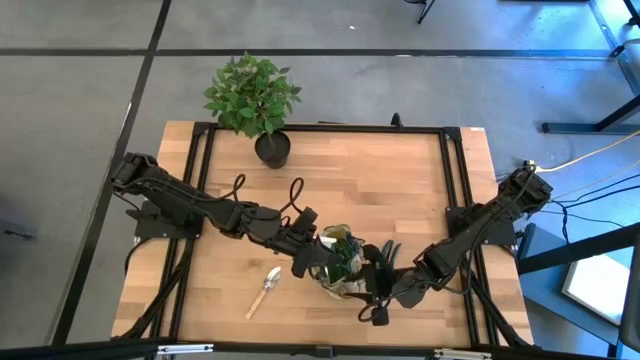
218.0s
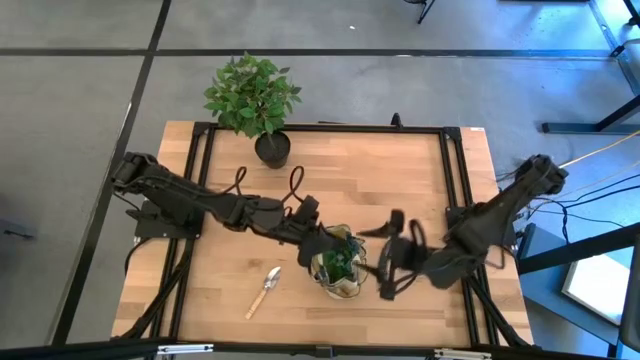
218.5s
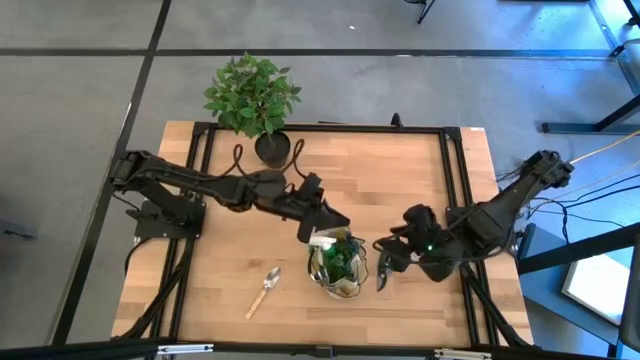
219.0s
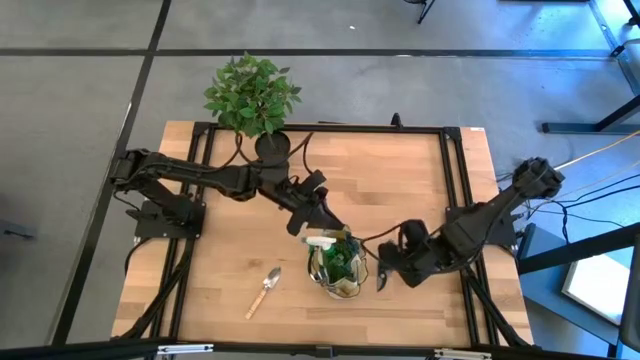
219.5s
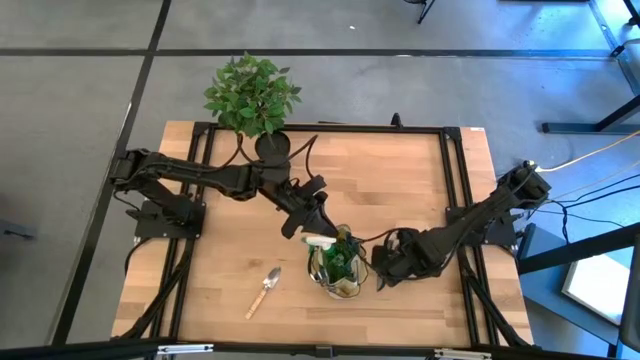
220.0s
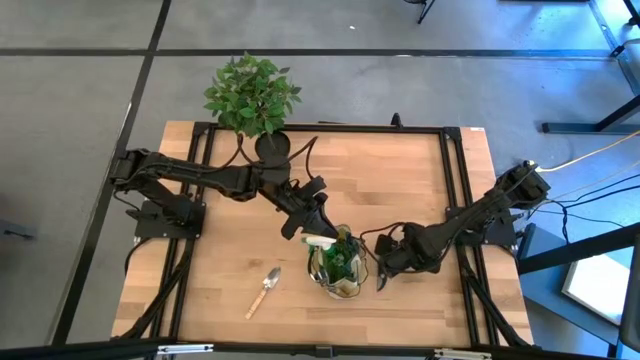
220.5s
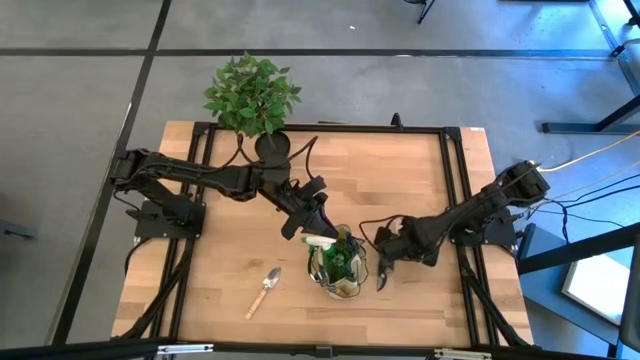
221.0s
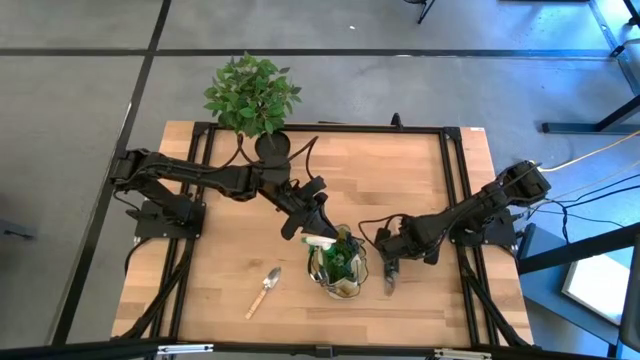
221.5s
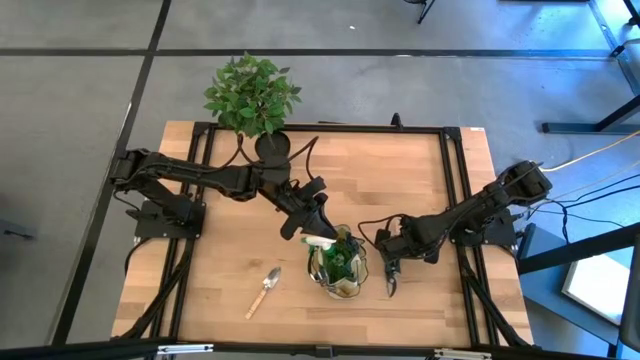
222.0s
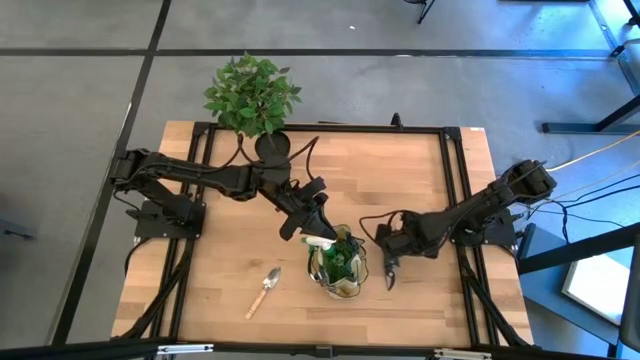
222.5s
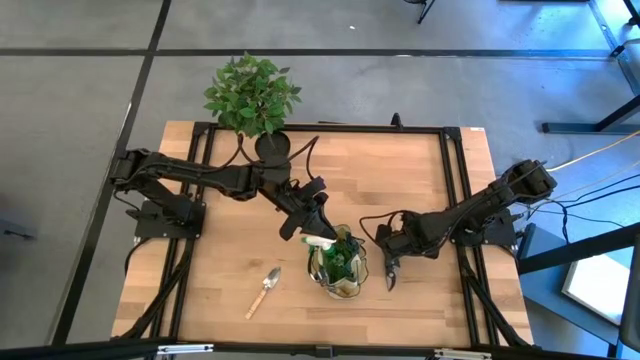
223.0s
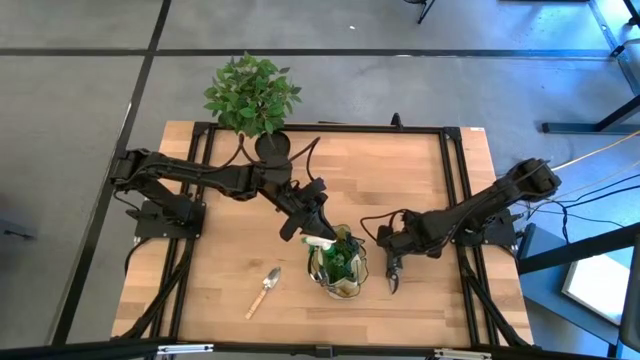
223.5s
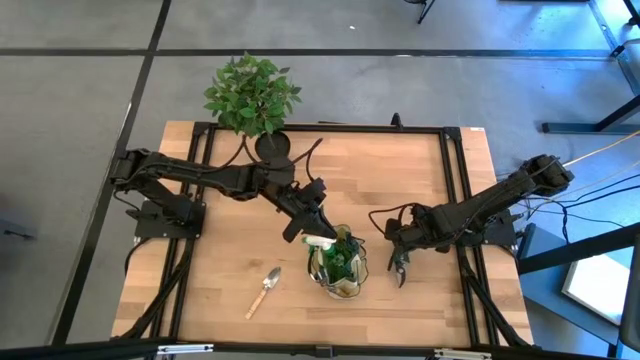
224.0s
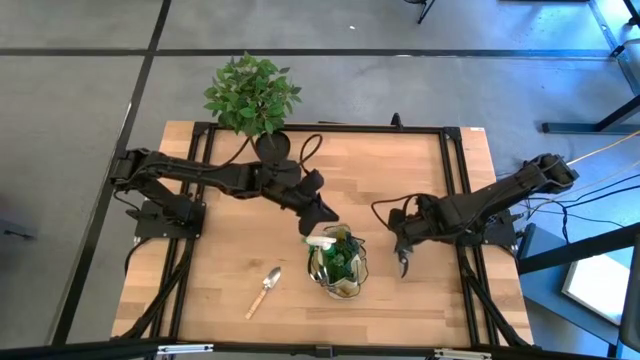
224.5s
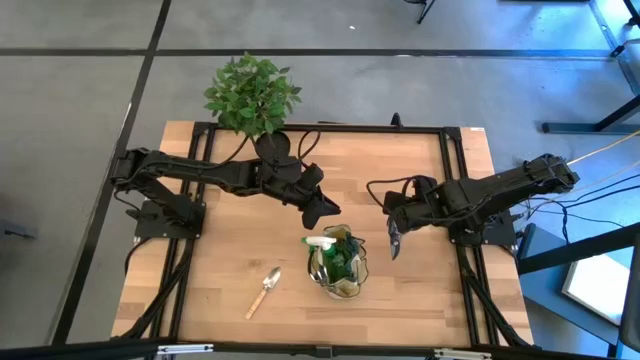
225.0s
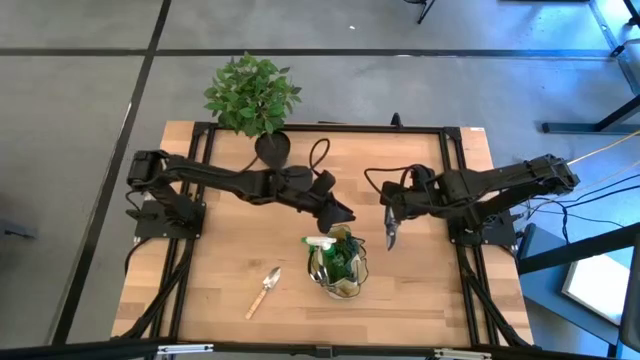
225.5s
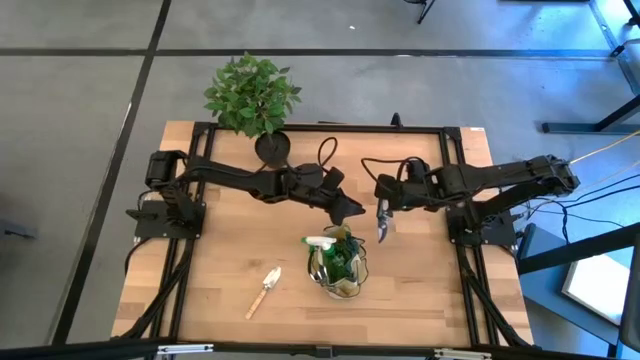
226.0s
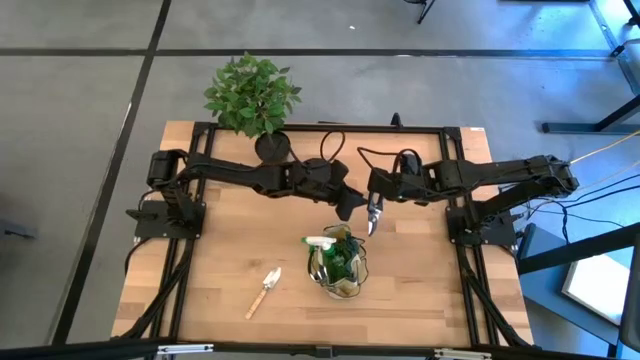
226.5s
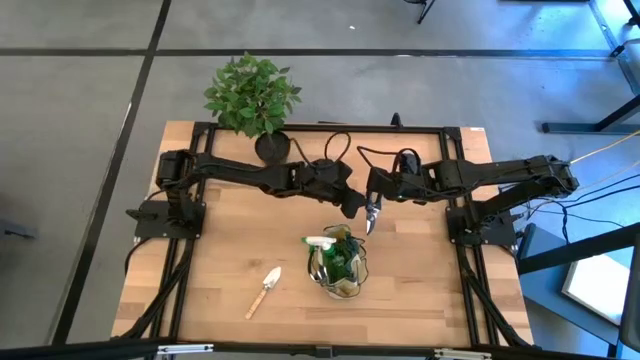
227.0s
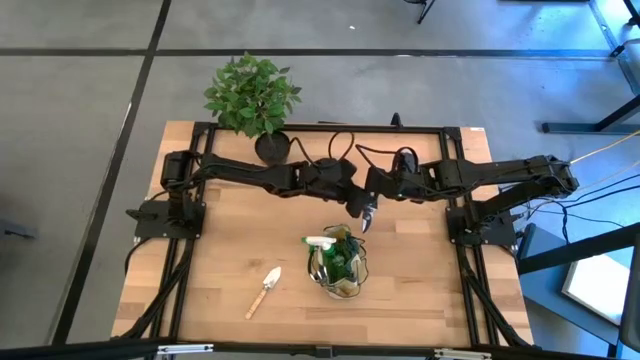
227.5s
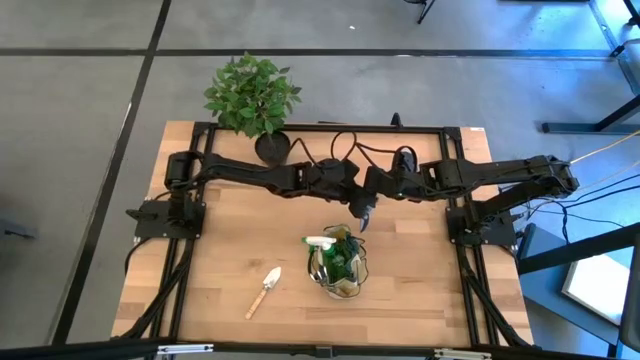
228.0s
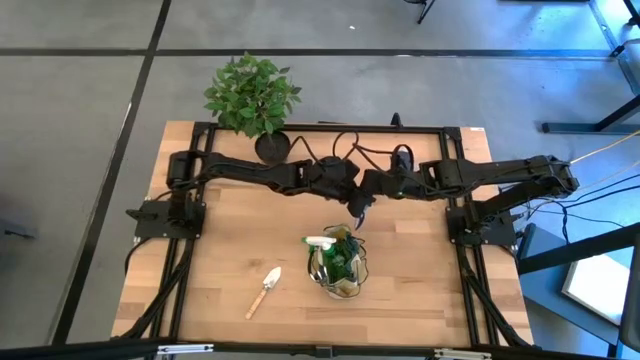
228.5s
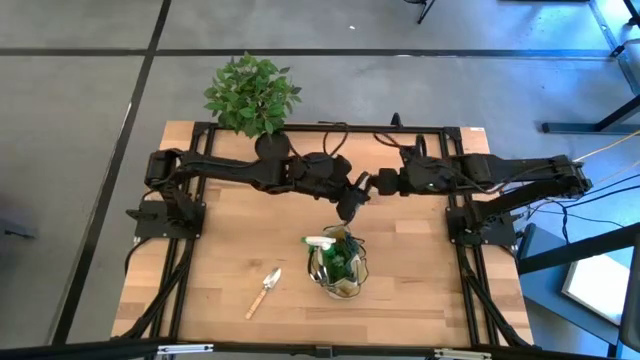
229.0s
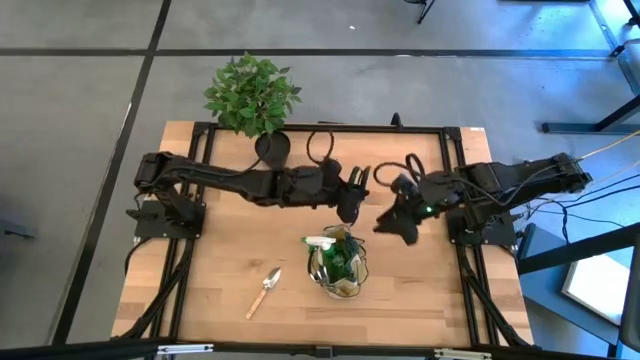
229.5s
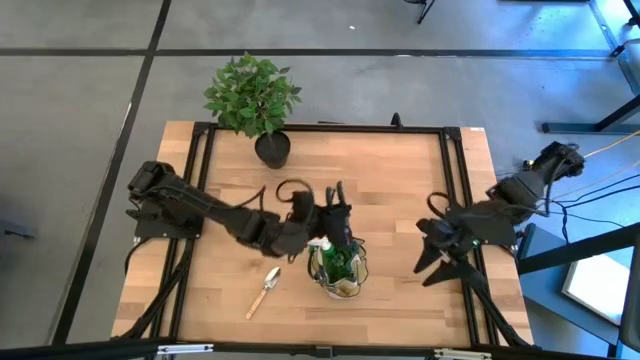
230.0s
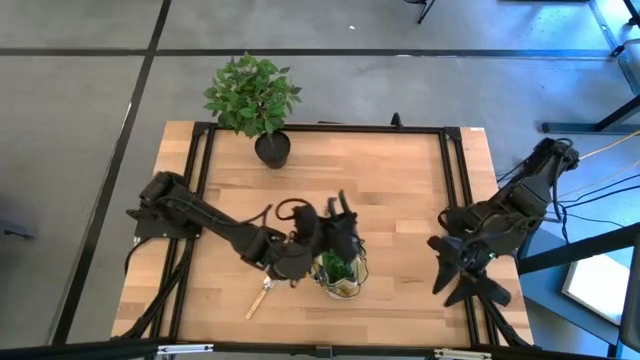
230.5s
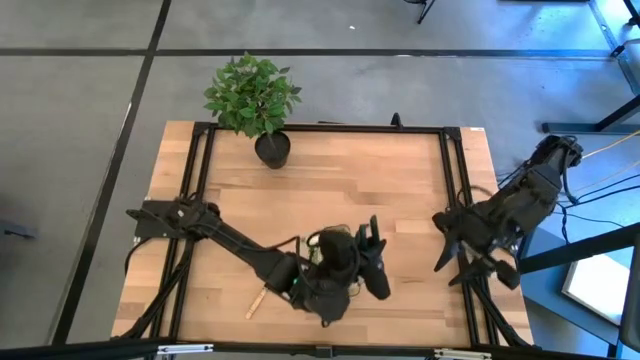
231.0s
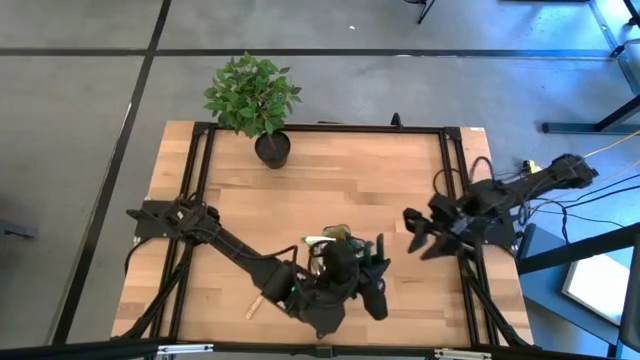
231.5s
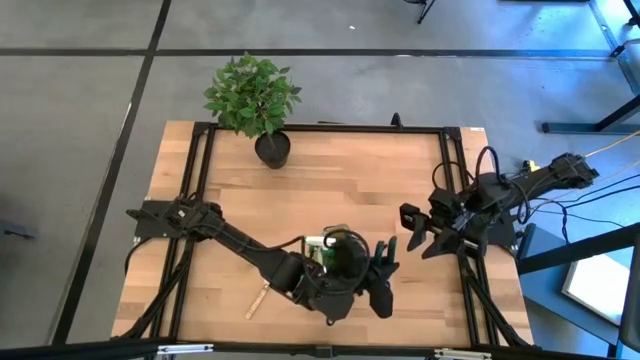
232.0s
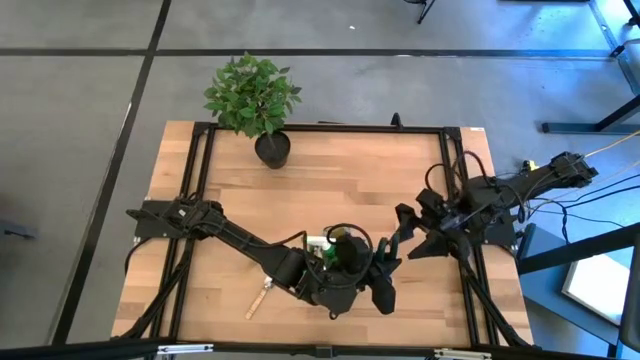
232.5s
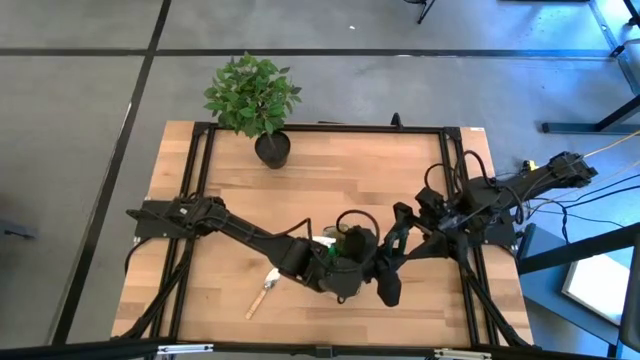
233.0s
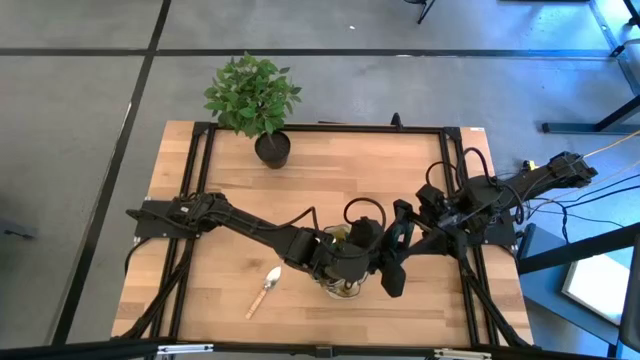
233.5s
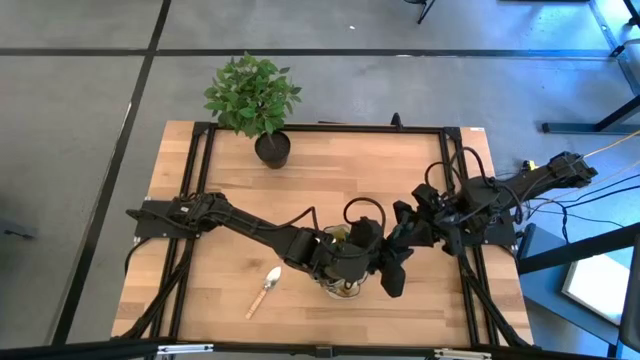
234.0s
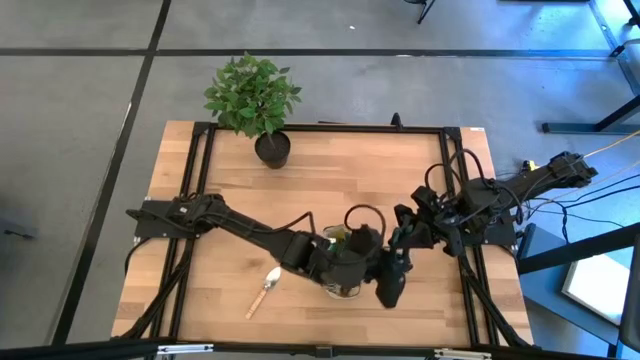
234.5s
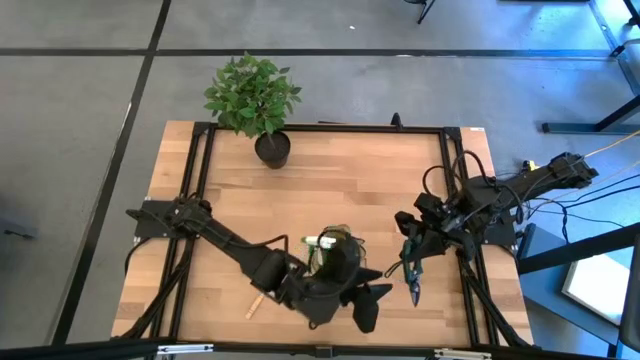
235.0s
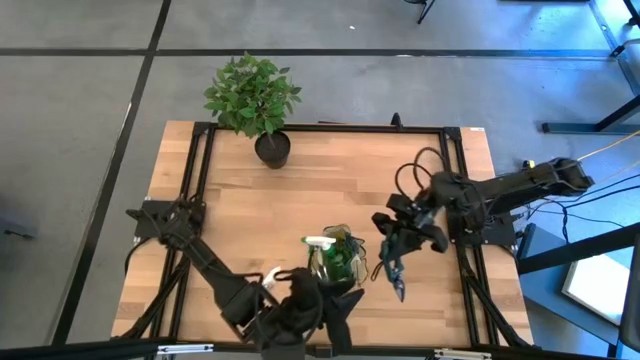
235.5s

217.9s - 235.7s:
Task: Pick & Place Garden tools in Gardening bag
Put the green shear scissors into the brown gardening bag

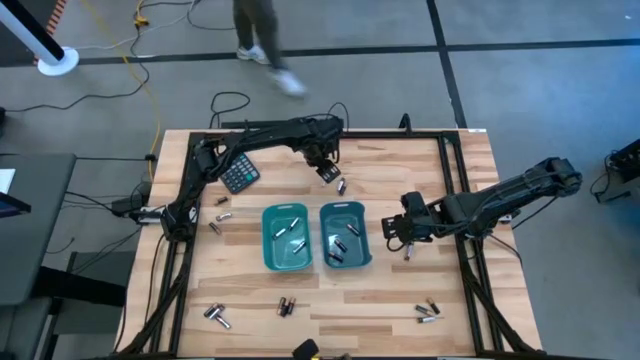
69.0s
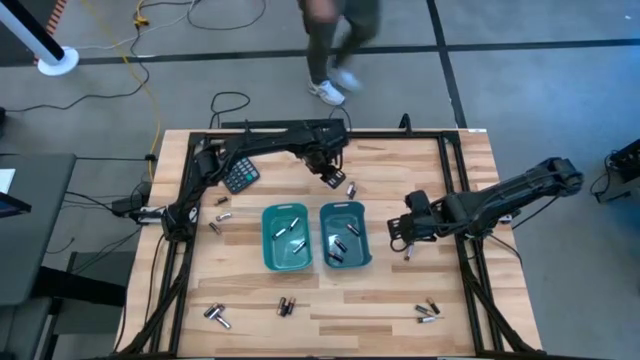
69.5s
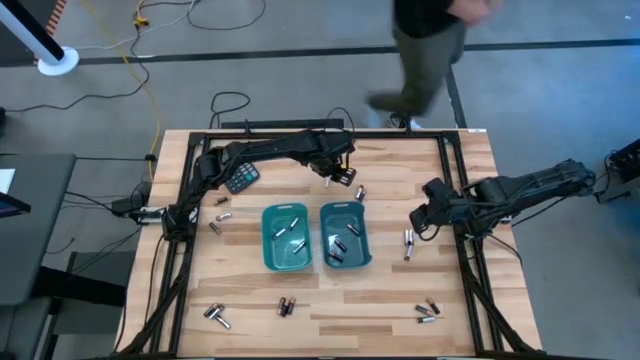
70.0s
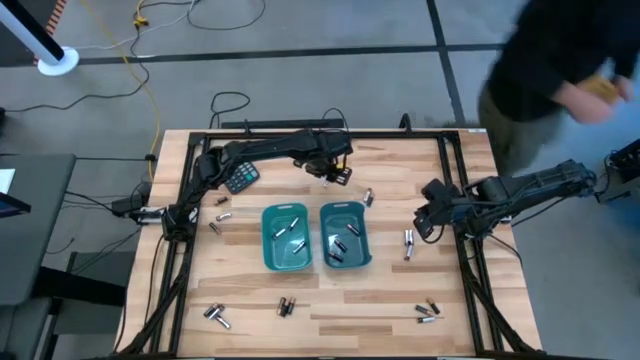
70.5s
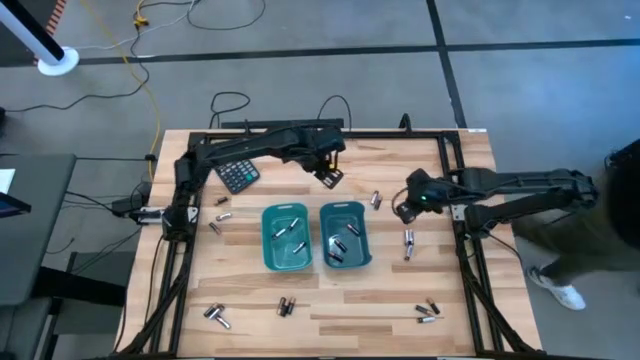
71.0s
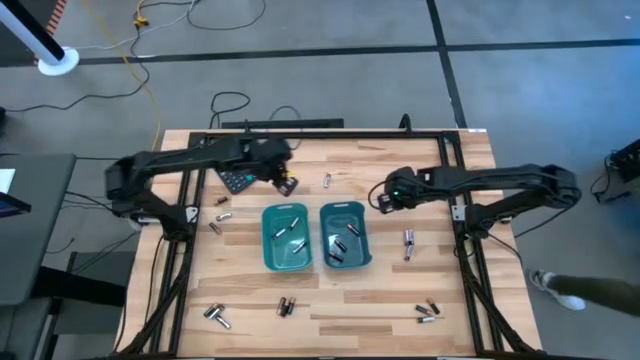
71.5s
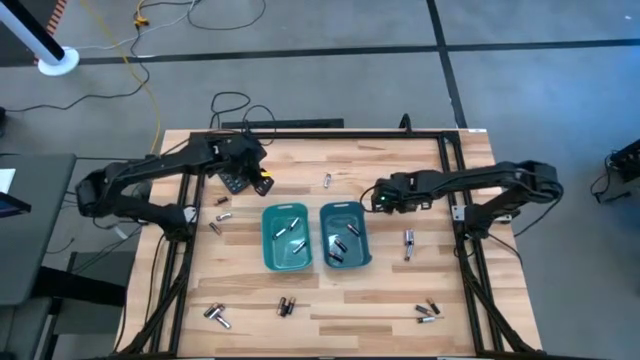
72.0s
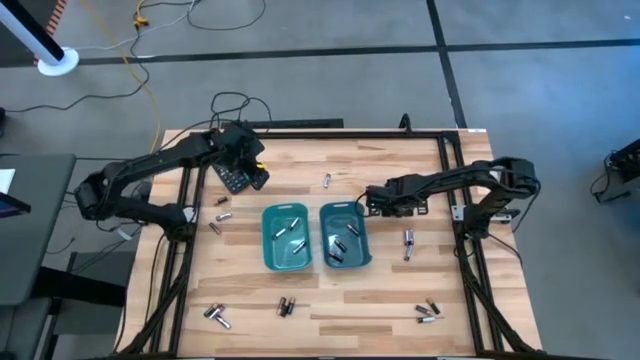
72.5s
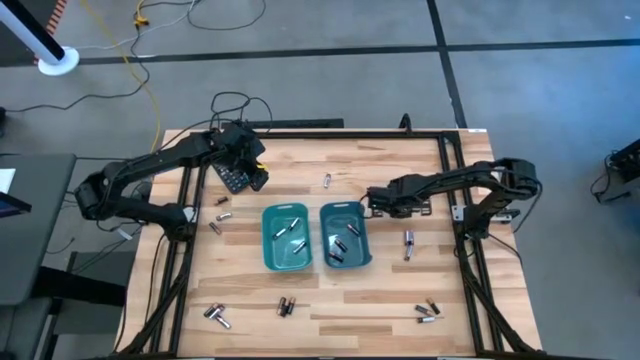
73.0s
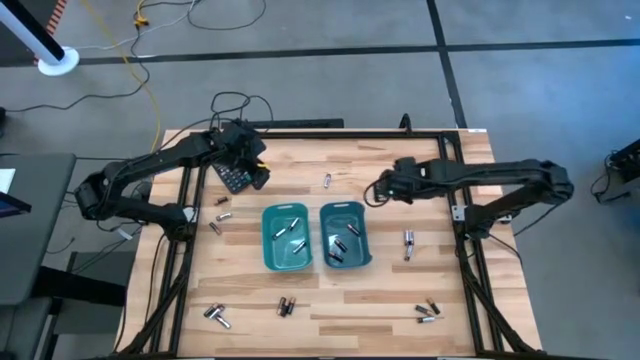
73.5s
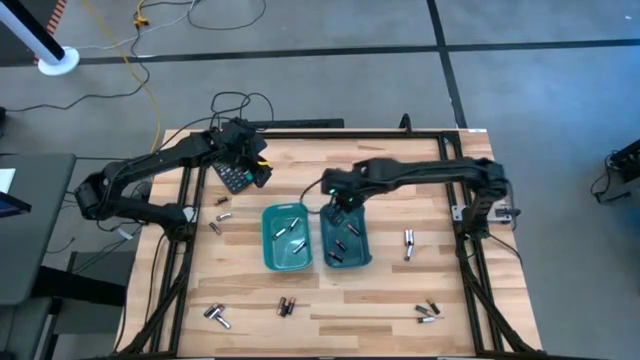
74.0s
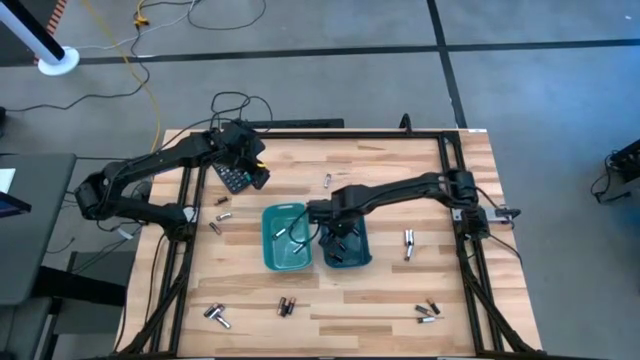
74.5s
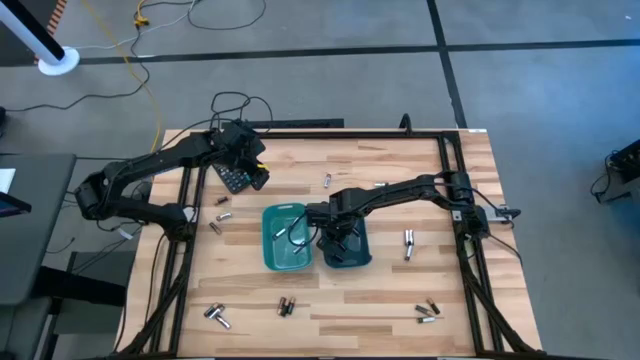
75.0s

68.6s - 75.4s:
Task: Sort batteries
Put the black battery into the blue bin
